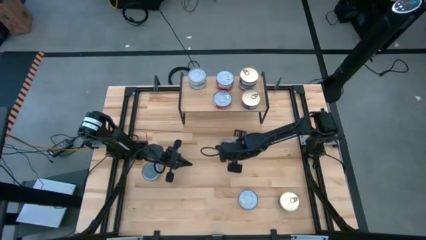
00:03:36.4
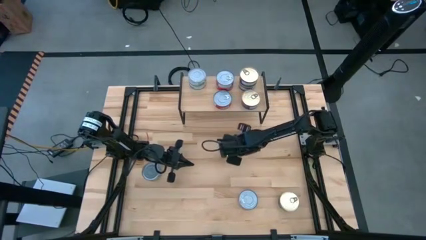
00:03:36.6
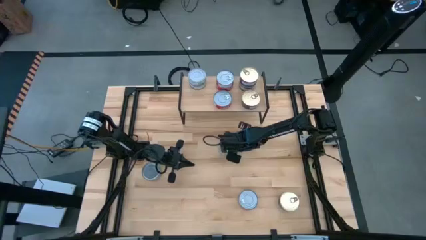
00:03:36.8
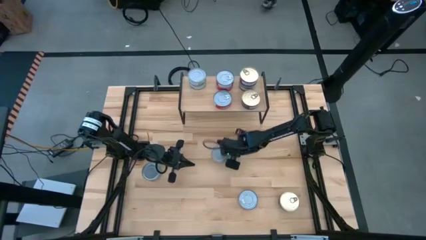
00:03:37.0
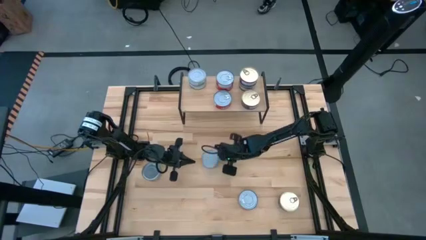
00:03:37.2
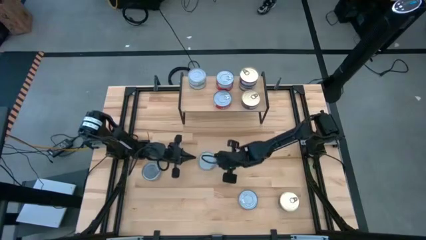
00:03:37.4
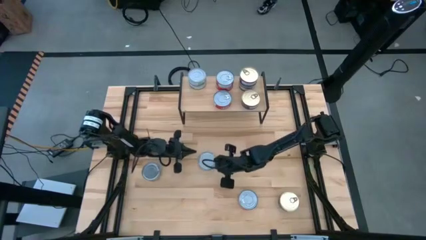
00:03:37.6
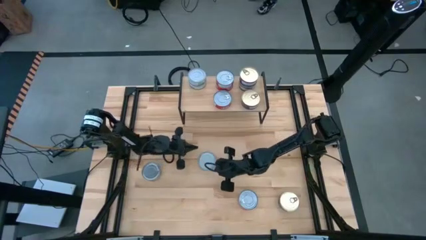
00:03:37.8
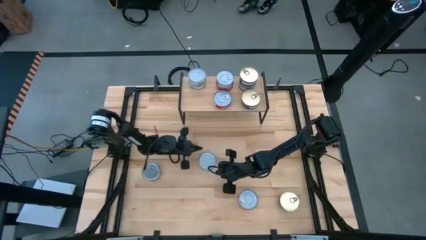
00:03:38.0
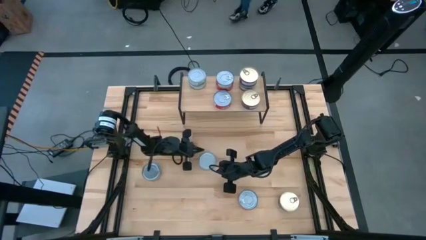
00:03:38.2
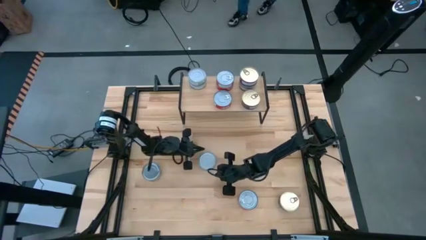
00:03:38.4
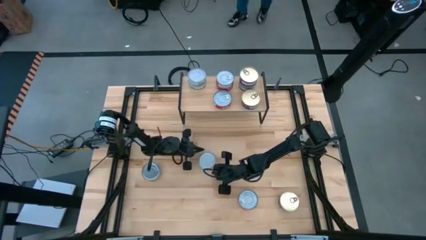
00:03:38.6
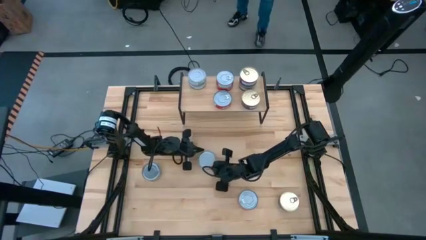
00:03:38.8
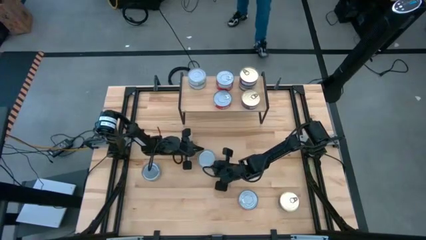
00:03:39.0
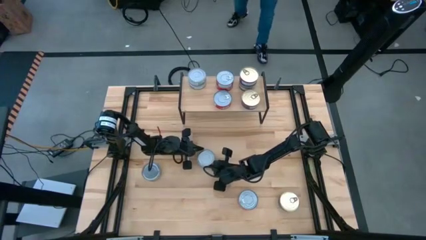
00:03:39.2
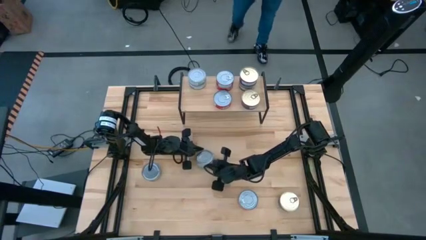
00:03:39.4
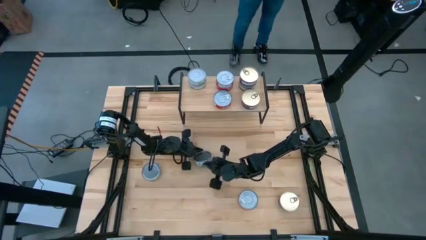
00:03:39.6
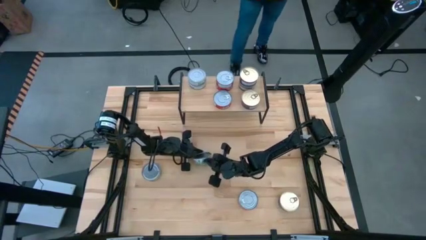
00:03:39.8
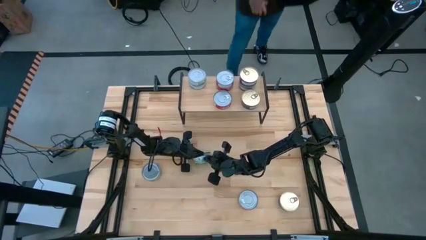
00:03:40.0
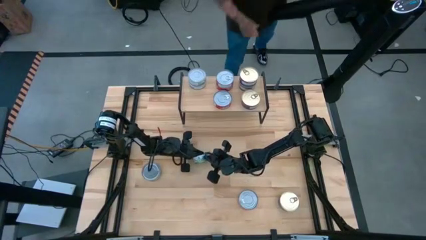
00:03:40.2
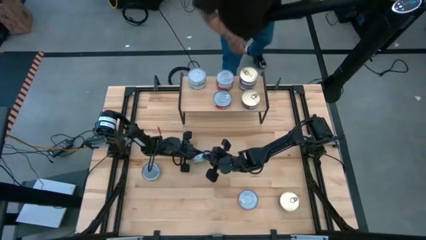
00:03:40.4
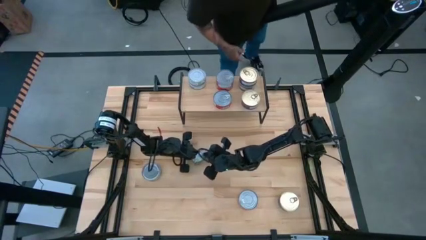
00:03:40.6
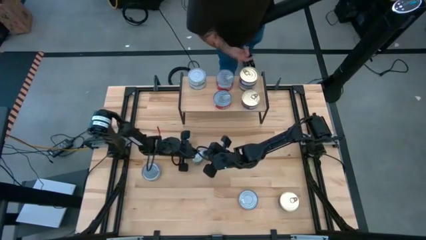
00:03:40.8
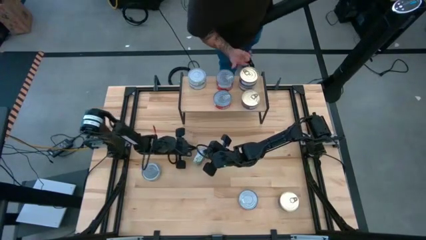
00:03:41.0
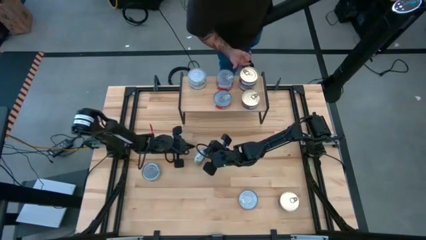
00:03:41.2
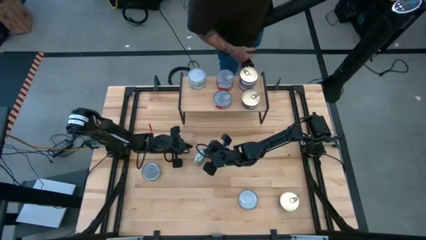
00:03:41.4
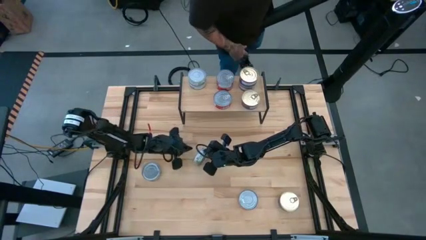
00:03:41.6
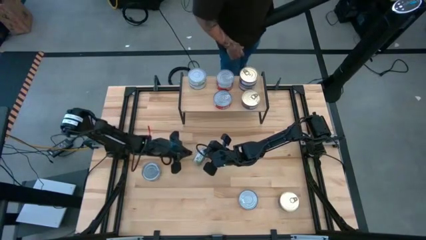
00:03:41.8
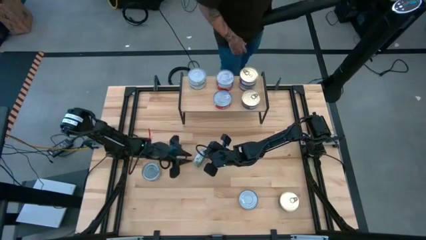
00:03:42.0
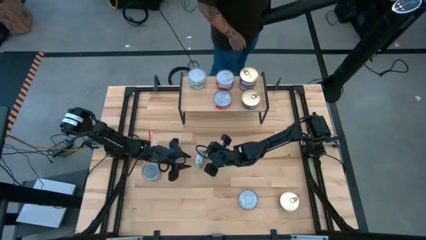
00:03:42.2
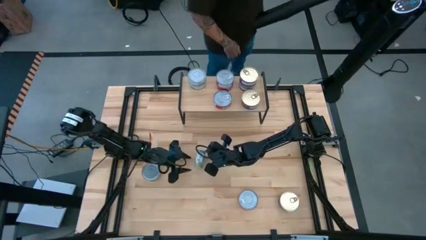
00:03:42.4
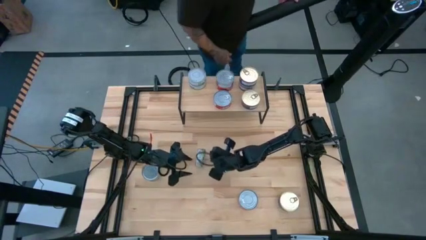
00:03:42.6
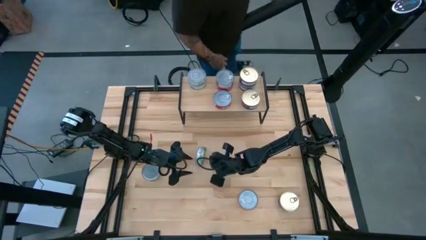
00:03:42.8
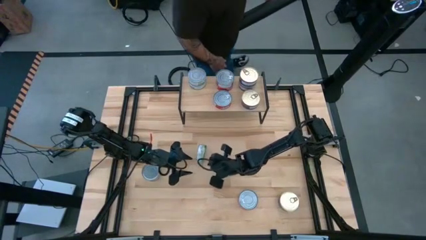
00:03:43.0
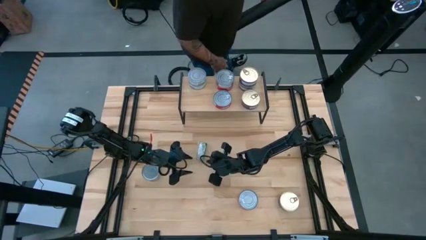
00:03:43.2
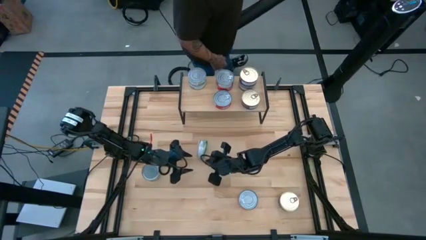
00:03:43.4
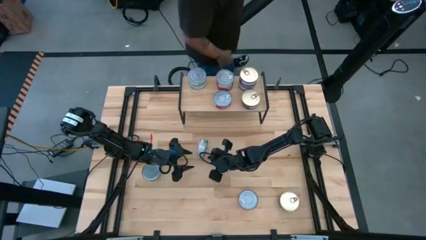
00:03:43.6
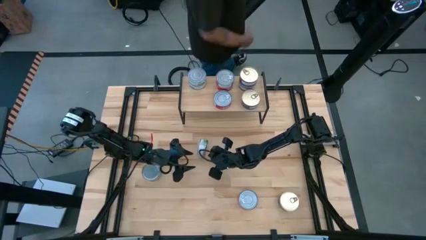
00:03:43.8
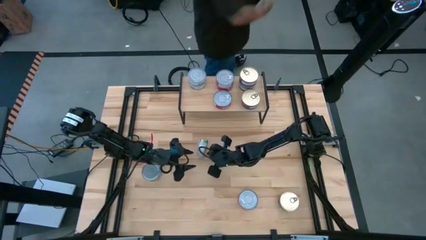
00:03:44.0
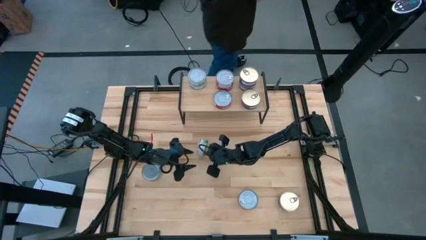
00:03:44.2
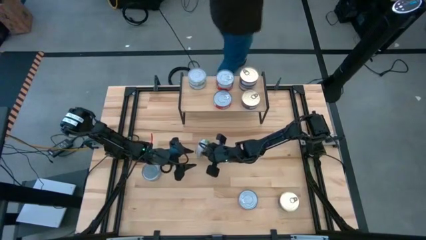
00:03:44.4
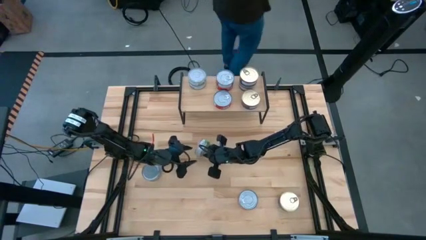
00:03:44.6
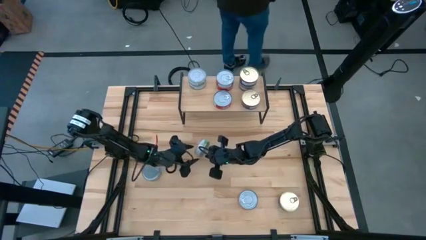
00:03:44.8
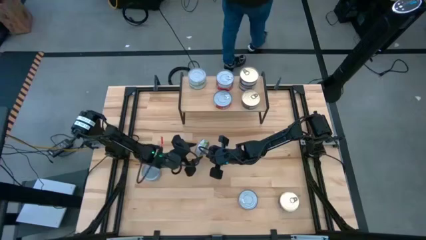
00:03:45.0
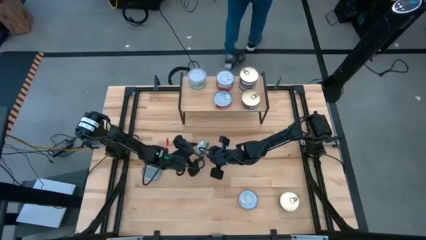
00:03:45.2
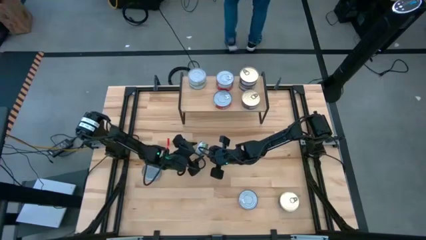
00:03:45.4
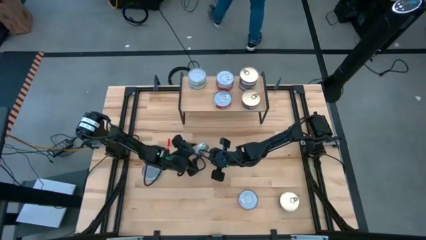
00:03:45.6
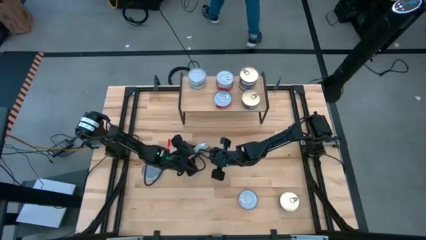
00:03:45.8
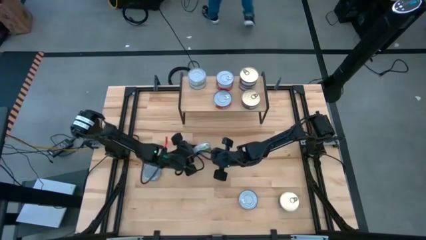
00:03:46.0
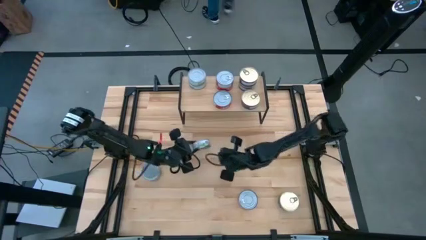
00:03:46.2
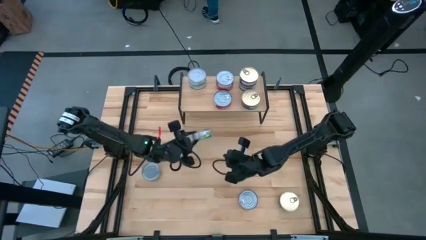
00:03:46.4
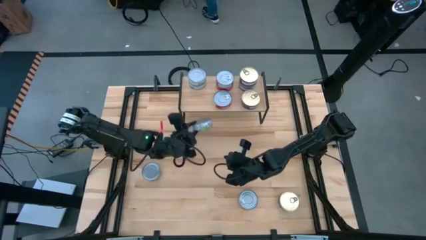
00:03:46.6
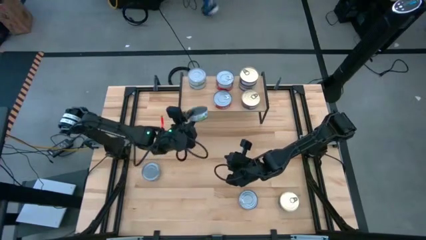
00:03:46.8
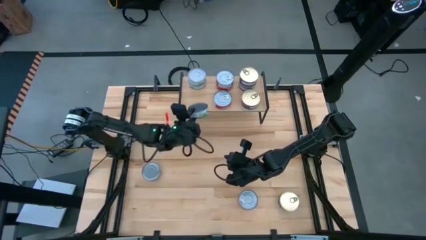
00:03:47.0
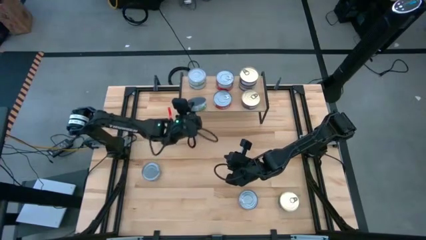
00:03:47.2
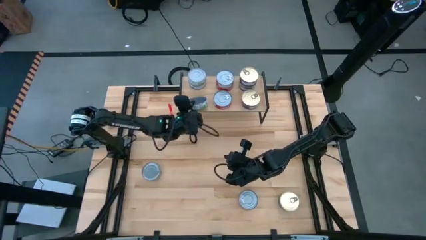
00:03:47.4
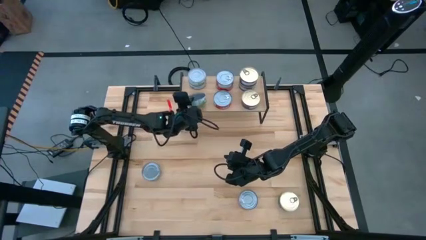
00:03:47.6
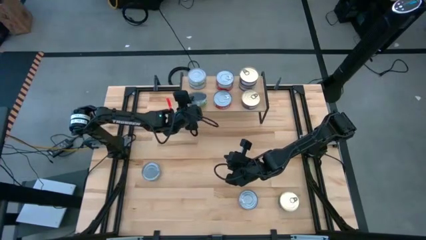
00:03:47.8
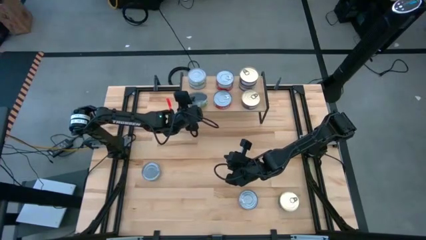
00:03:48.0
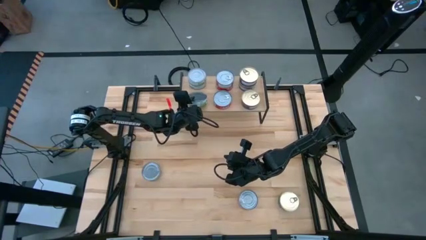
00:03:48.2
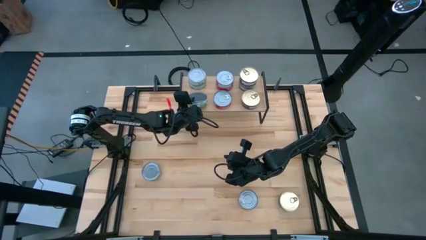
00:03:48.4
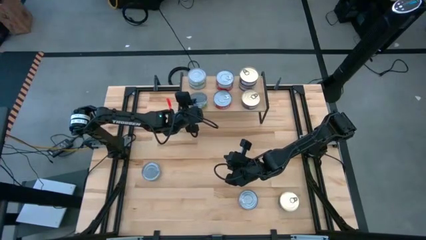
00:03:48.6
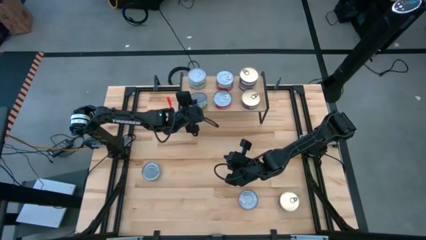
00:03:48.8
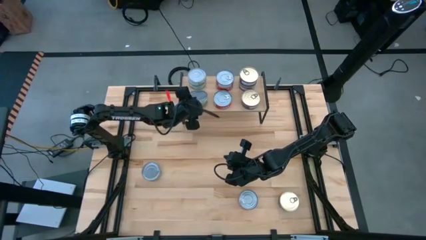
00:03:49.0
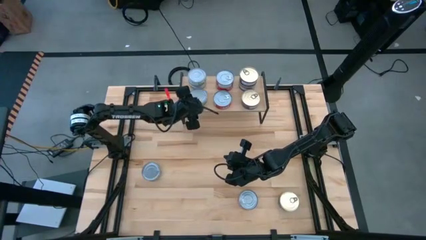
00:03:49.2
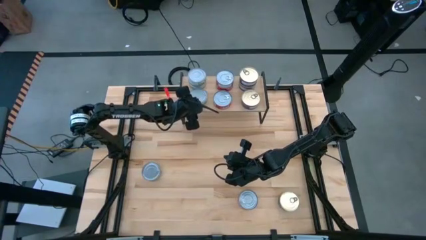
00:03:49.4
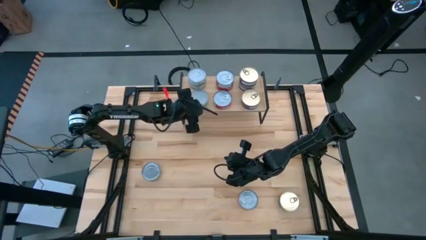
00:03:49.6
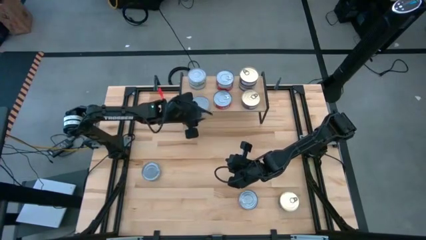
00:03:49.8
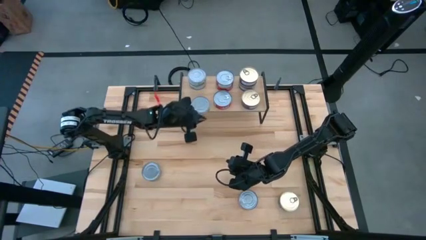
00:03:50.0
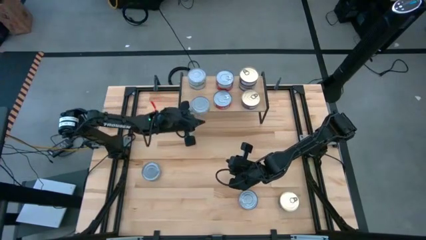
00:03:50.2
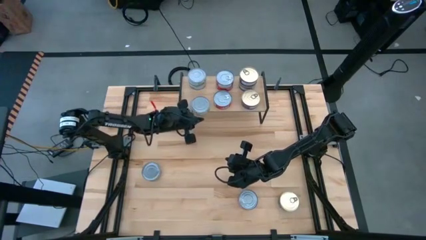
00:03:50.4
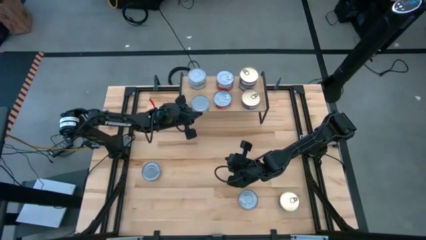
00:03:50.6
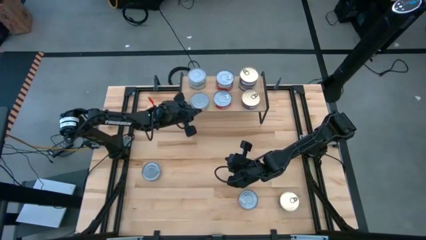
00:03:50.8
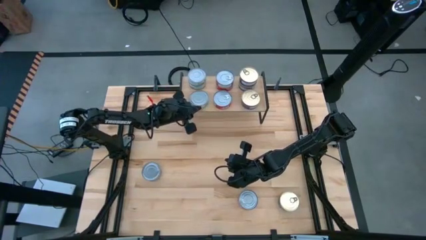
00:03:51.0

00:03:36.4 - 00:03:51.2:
Task: Stack canned seafood by type on shelf
Put the green and white tuna can on the shelf aligned with the green and white tuna cans

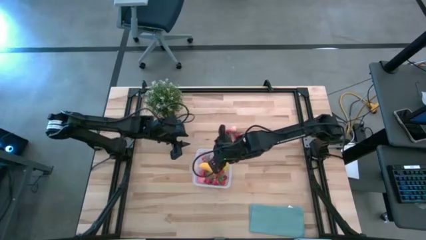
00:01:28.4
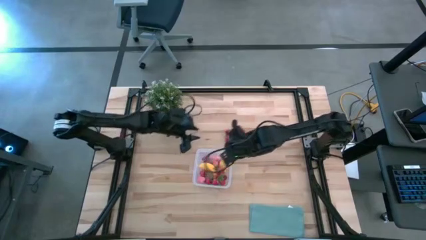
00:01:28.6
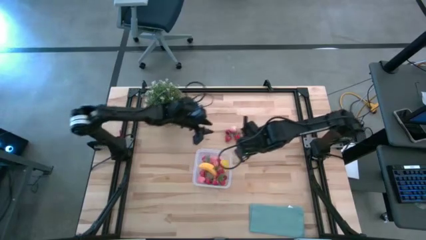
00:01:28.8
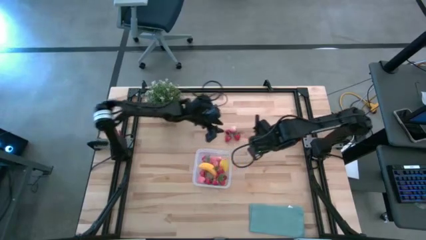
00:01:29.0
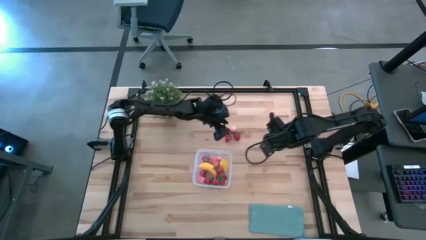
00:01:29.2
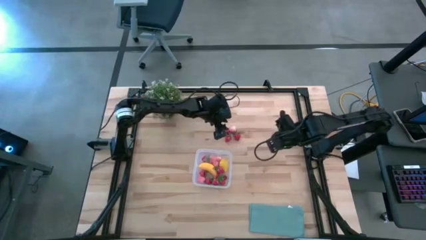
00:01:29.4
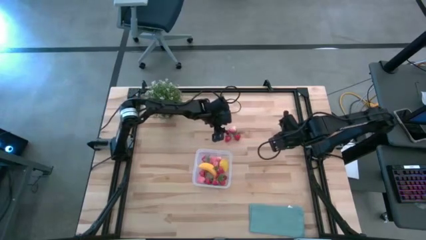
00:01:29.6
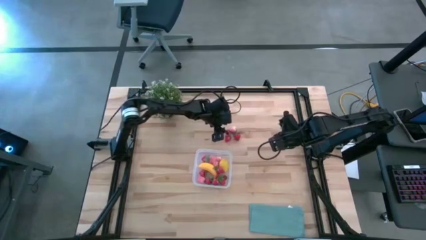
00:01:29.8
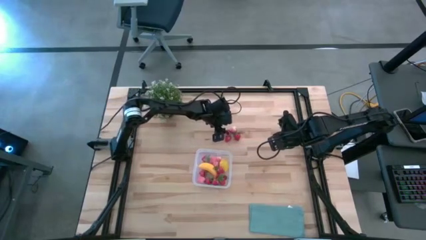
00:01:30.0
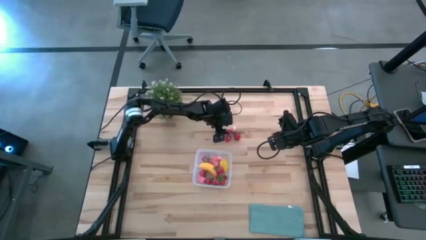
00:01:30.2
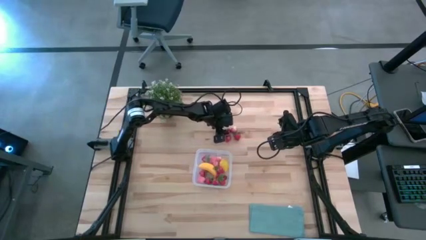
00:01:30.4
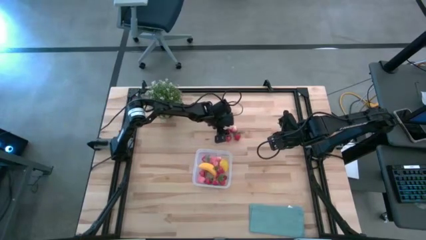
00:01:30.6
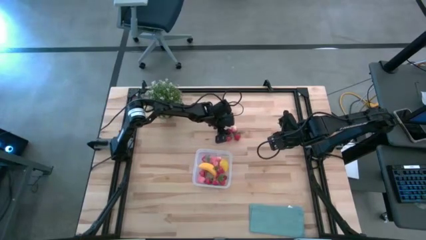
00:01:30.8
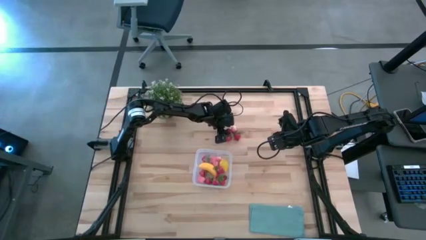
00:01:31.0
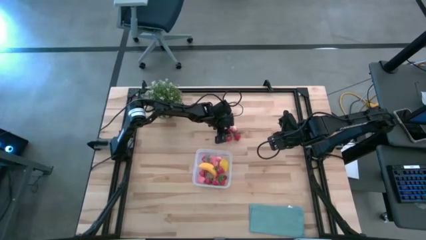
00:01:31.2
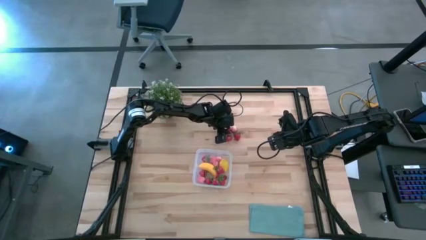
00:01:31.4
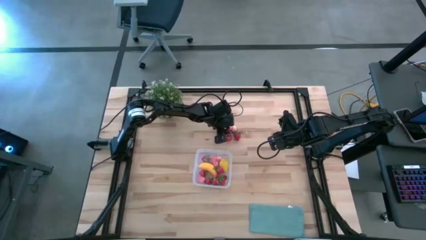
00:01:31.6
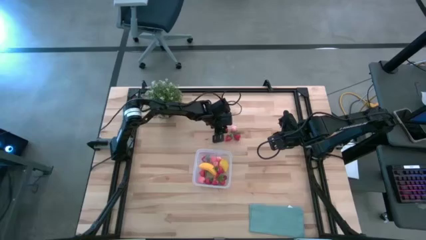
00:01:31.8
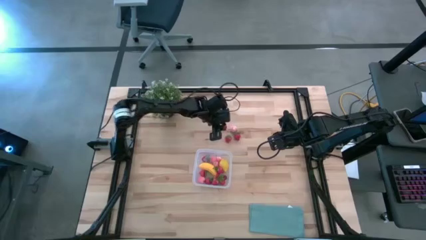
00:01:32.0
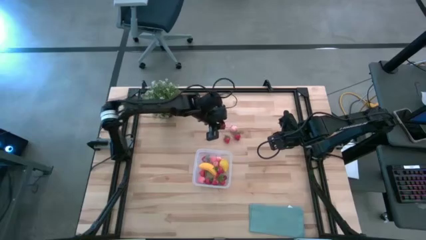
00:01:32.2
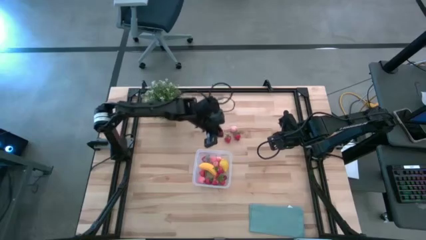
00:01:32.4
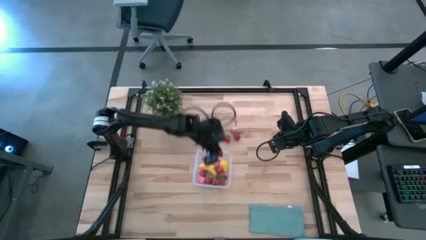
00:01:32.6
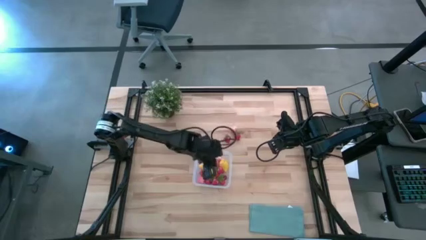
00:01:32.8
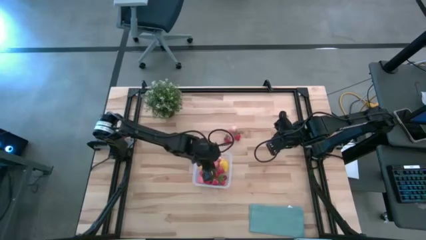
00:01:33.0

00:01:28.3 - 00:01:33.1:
Task: Pick and placing Produce into tupperware
Put the red cherry into the transparent container
